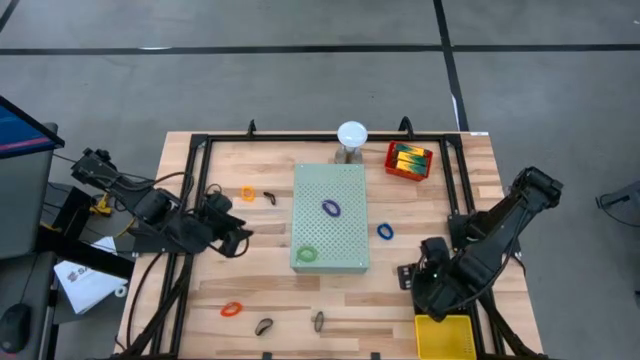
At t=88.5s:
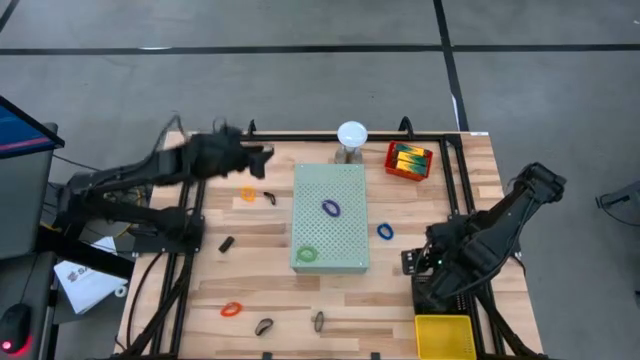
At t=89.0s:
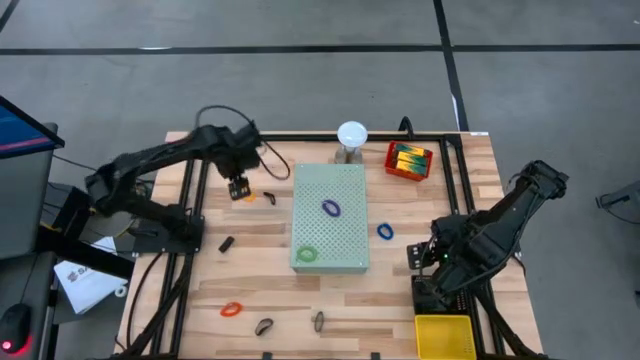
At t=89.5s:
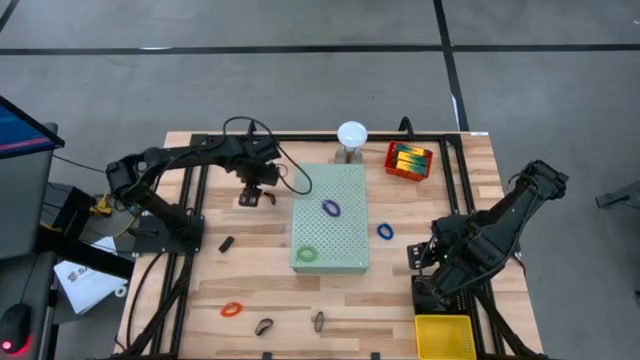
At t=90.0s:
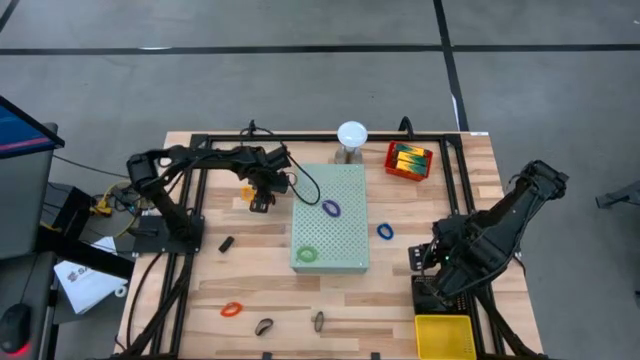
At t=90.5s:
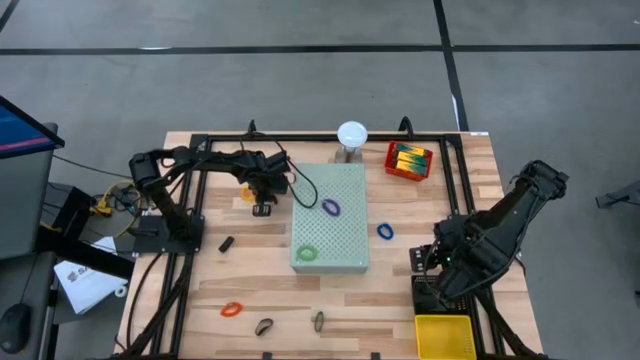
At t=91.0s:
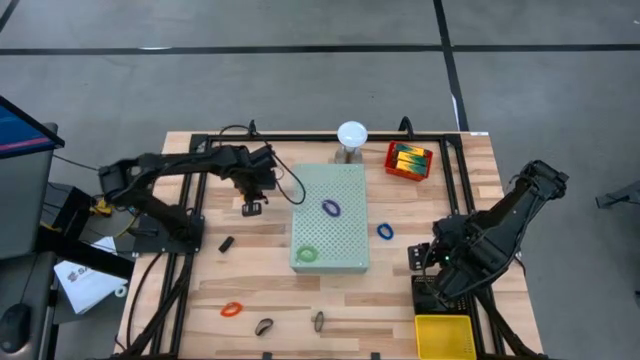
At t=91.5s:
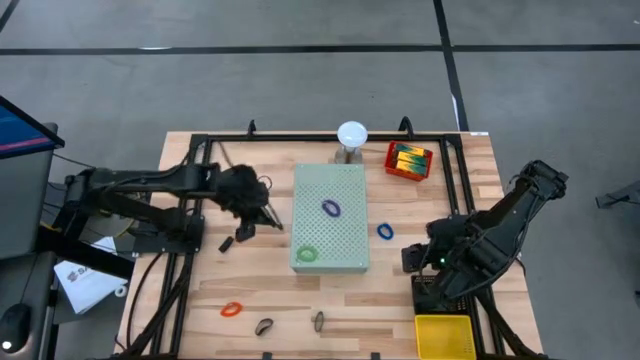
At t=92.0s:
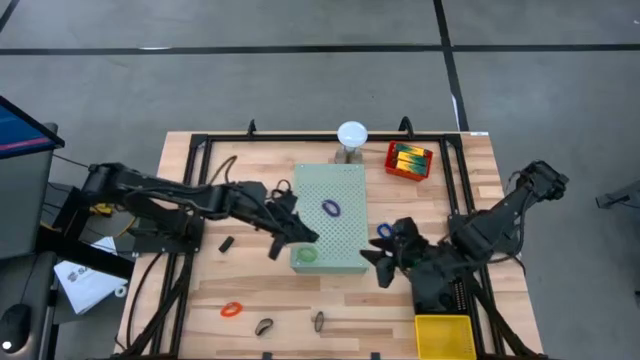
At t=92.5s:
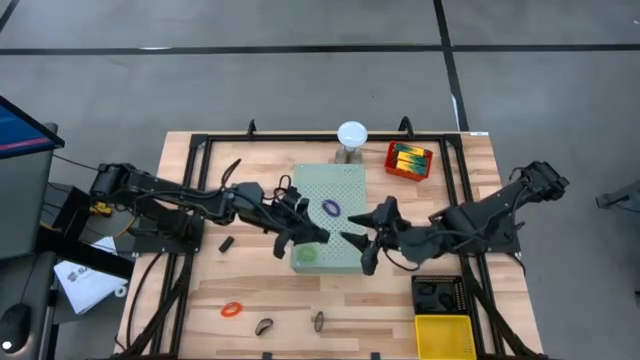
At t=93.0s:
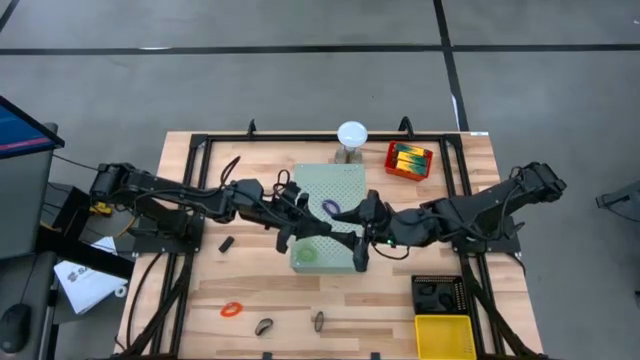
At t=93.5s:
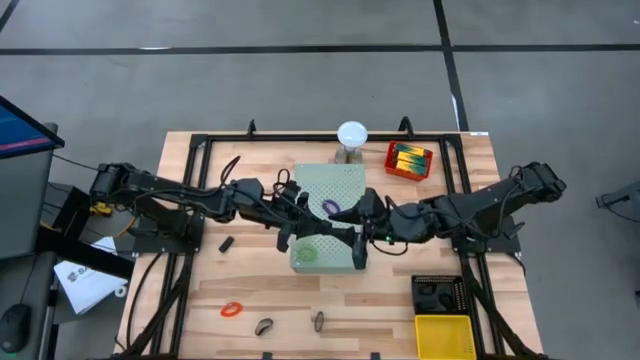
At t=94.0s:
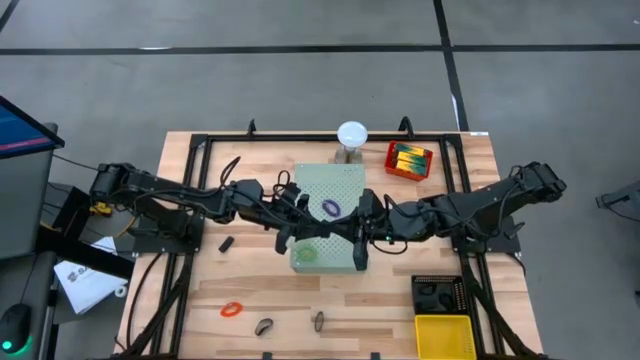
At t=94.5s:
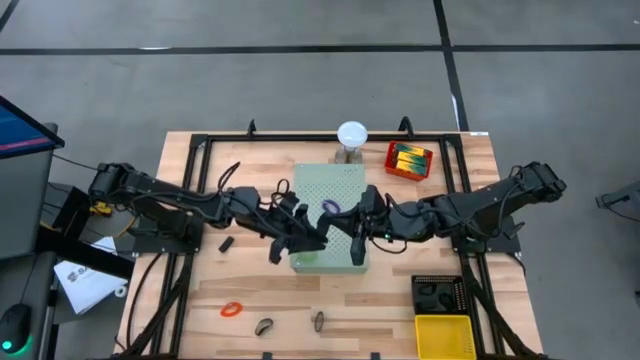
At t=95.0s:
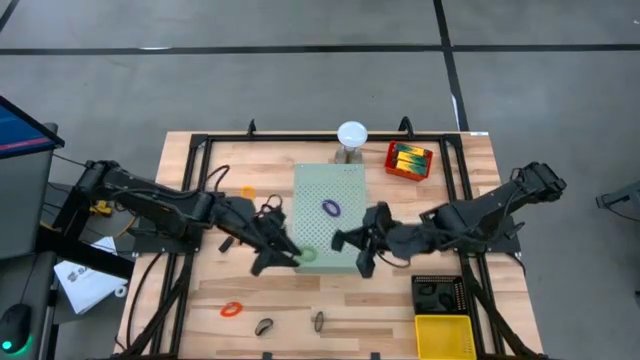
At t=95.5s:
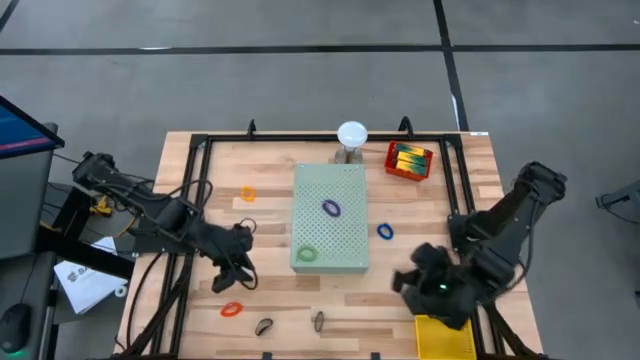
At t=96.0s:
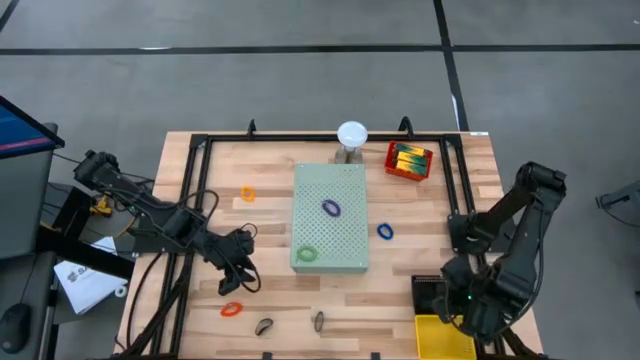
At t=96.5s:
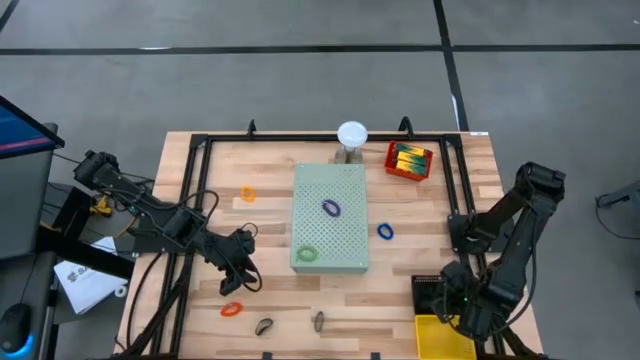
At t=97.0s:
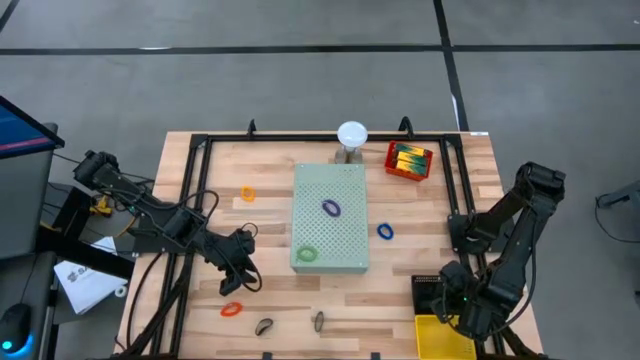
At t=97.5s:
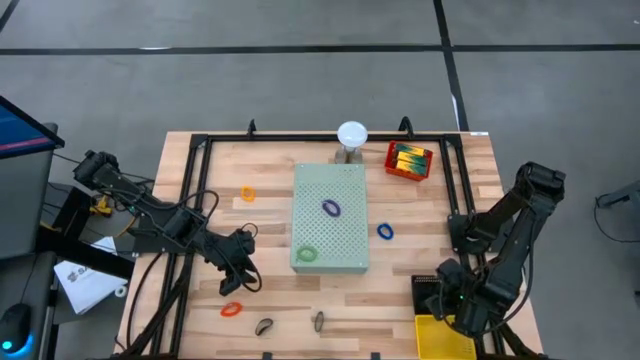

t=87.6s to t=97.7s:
Task: Pick & Place Office Desk Supplies
Put the black rubberband into the black bin

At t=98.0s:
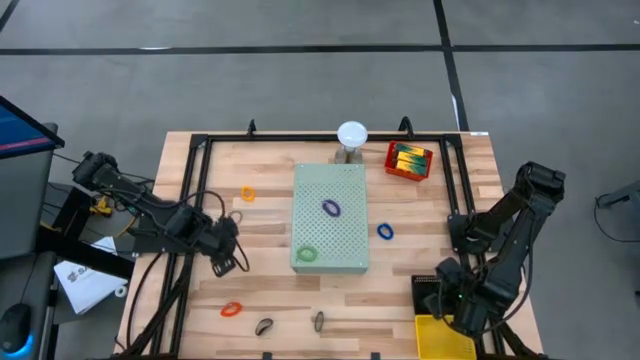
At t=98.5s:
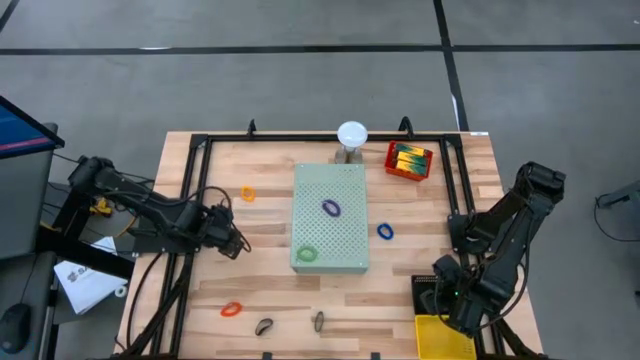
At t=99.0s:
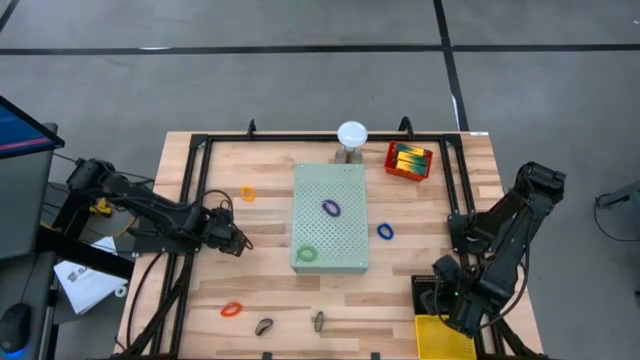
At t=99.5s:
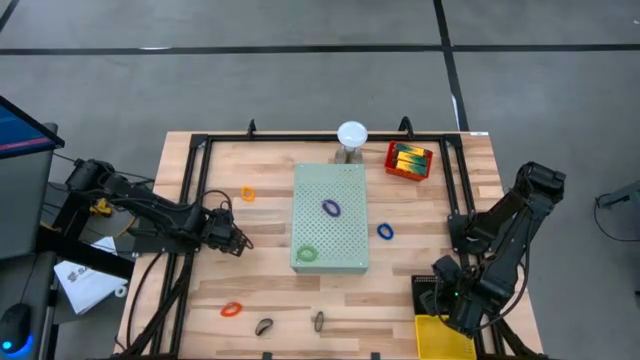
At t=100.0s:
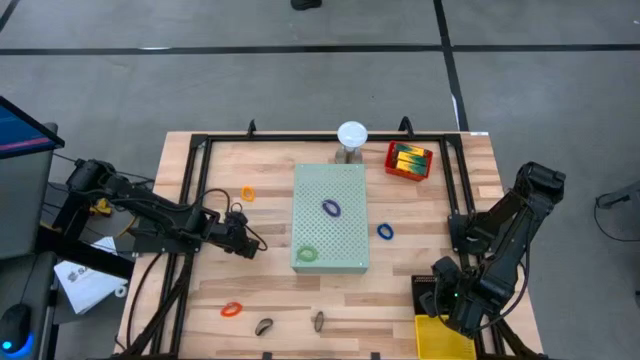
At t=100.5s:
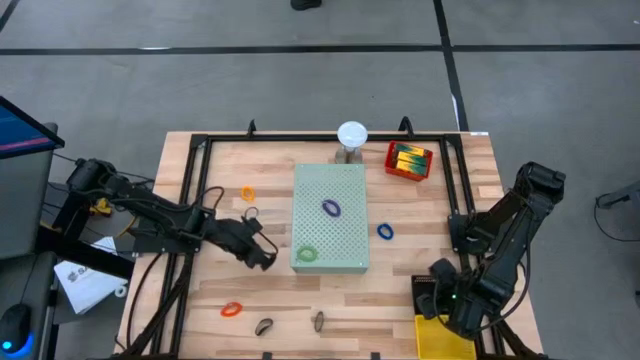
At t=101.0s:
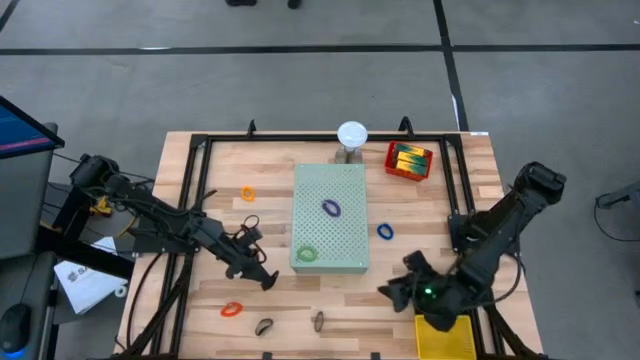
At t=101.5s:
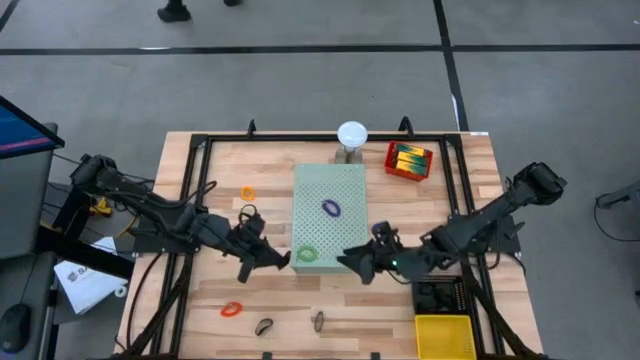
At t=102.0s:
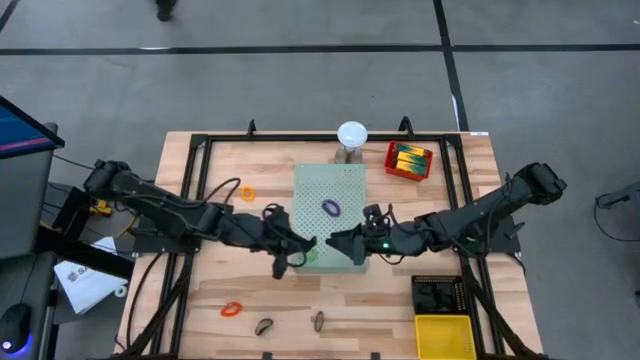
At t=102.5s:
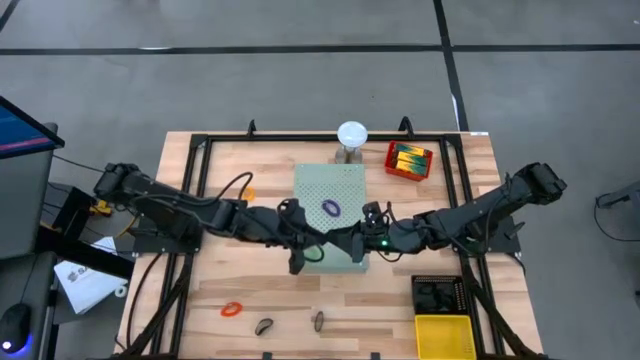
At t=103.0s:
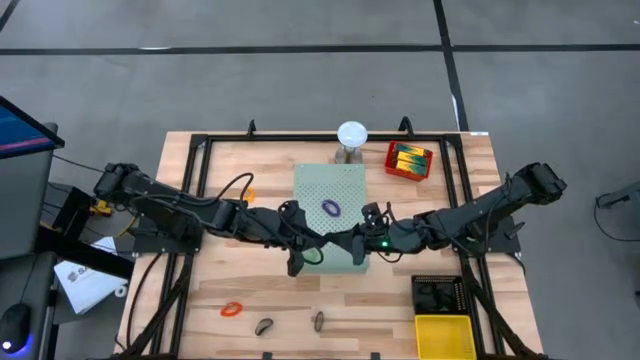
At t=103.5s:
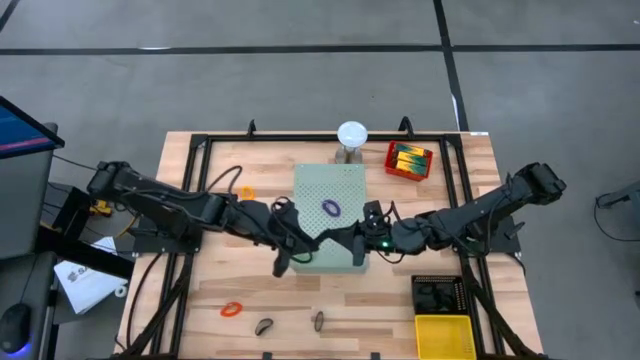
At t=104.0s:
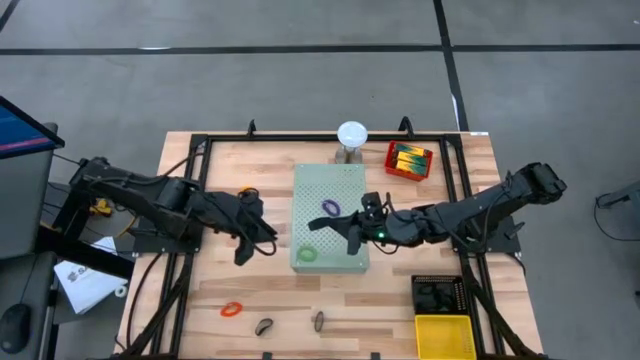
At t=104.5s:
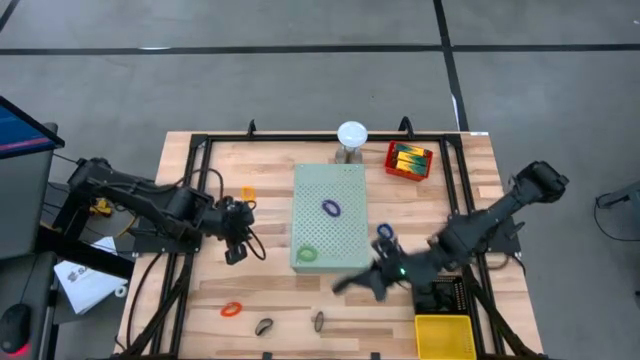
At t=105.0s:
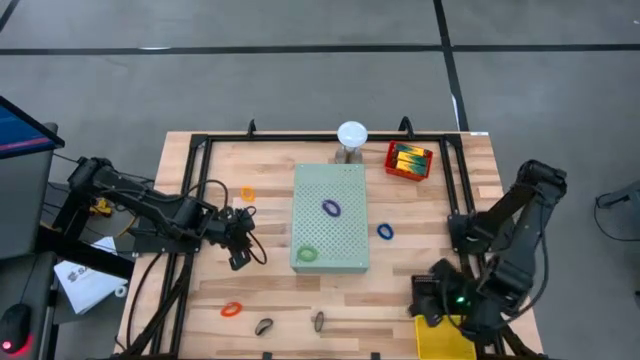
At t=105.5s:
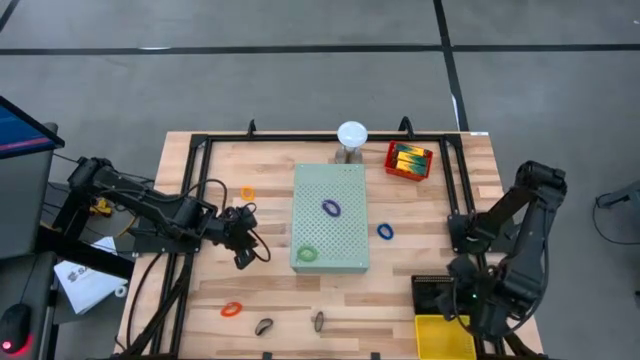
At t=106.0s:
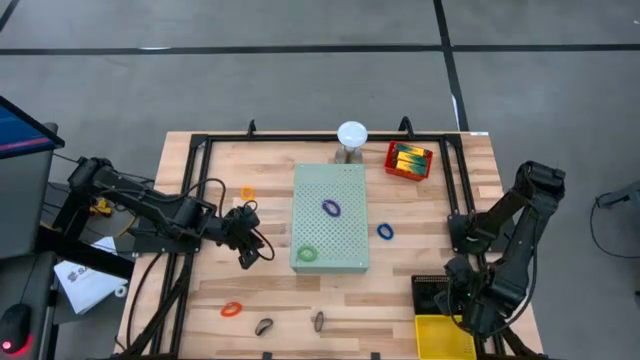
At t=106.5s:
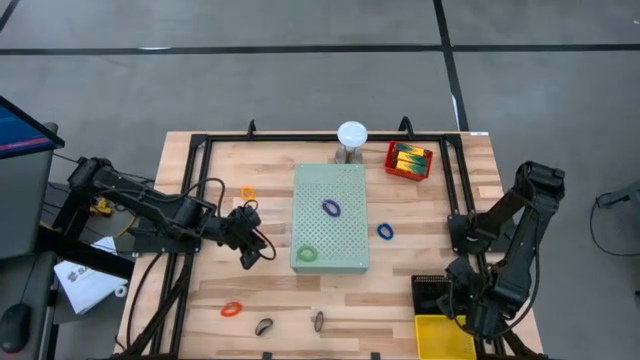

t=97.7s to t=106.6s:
Put the black rubberband into the black bin
